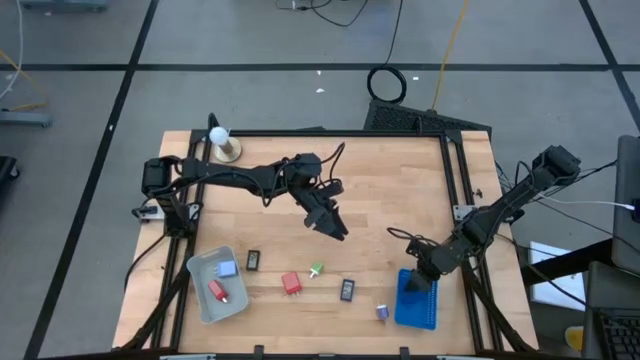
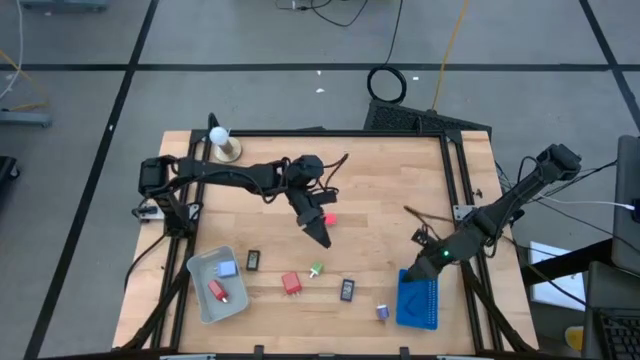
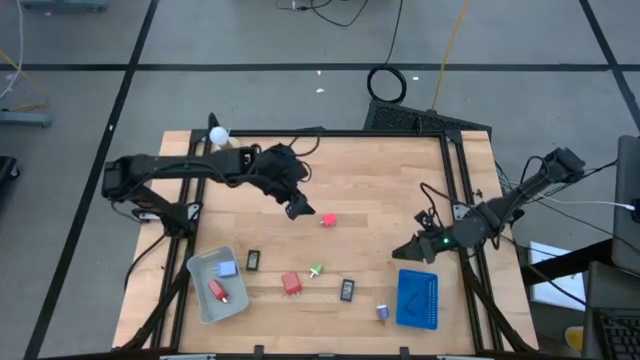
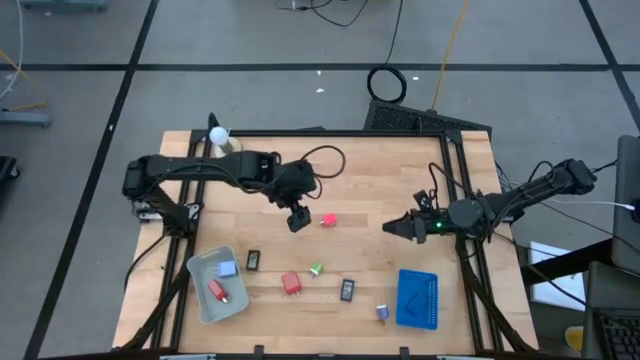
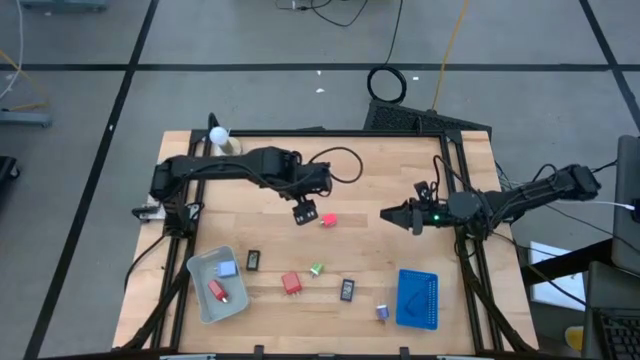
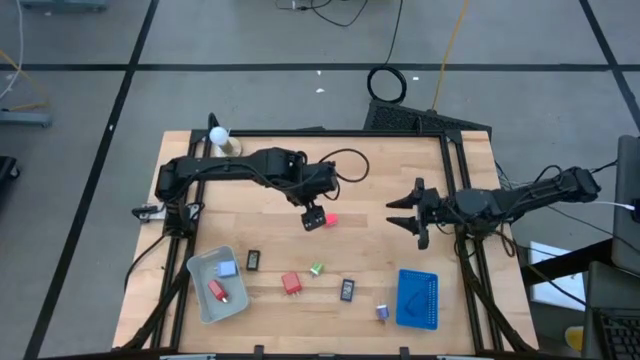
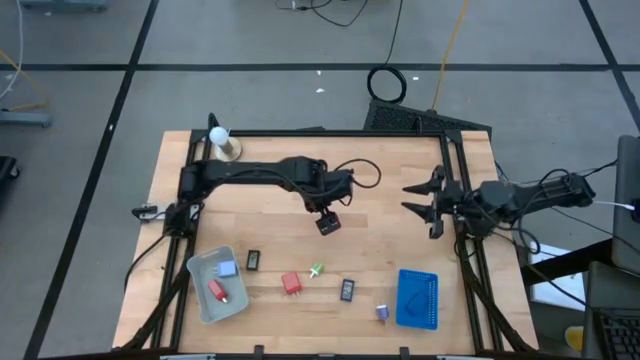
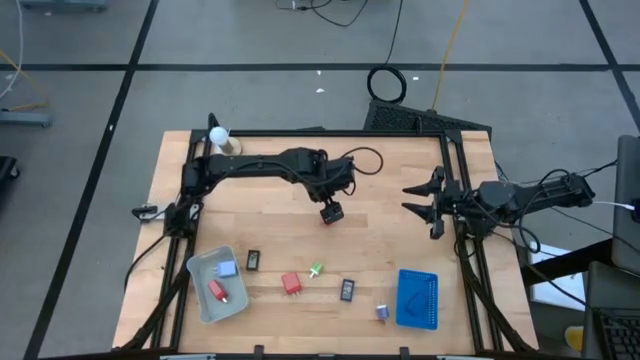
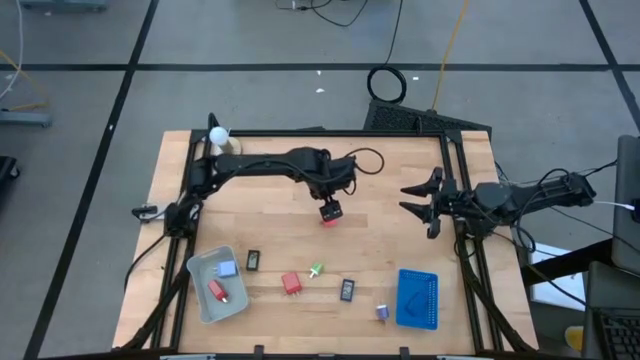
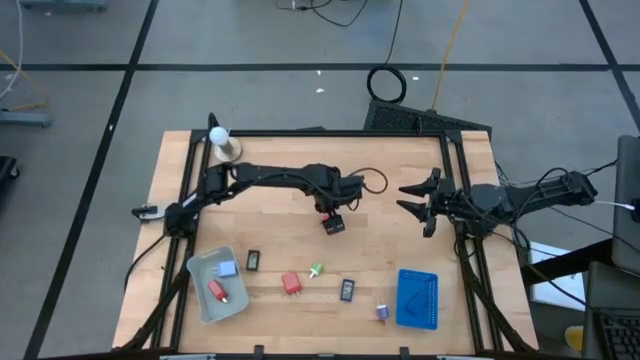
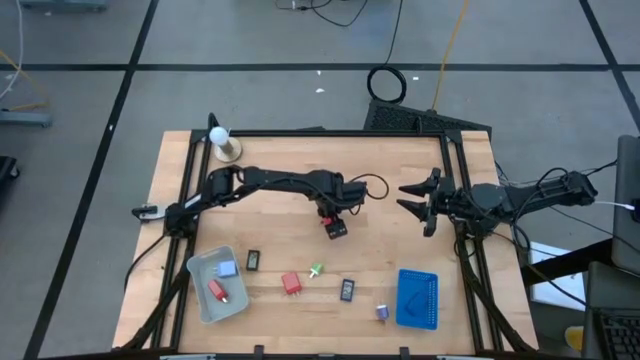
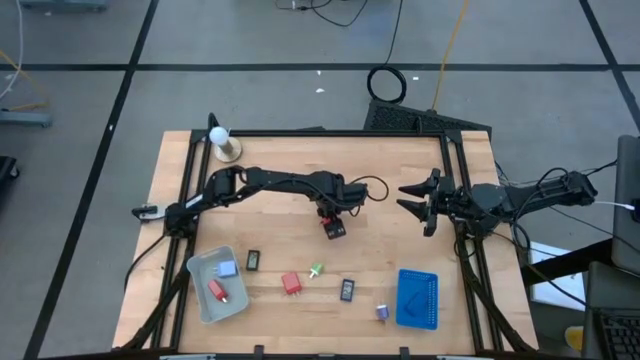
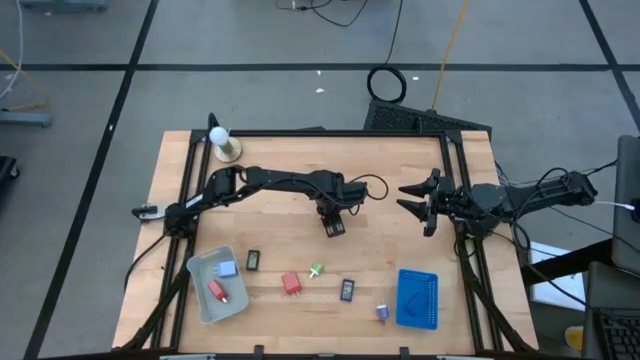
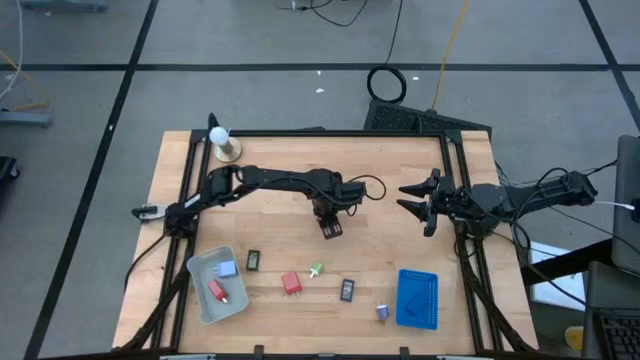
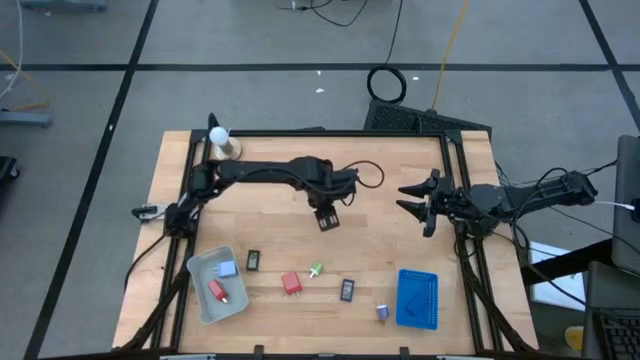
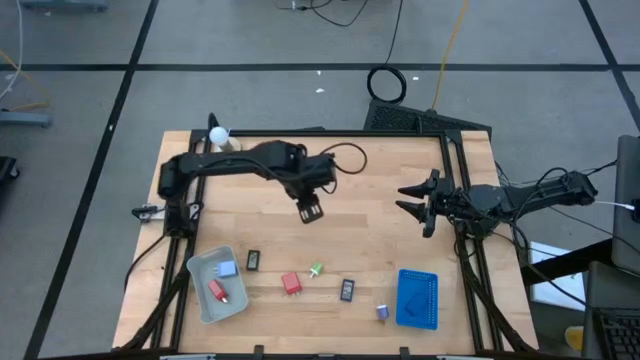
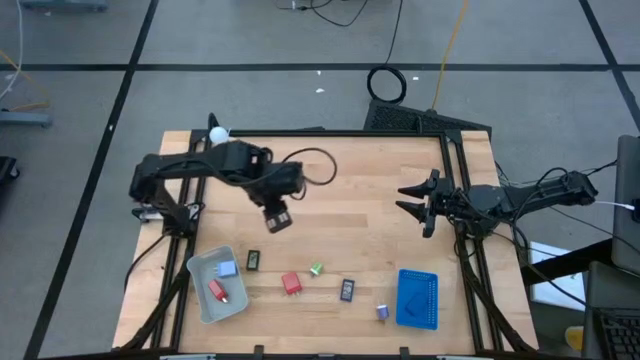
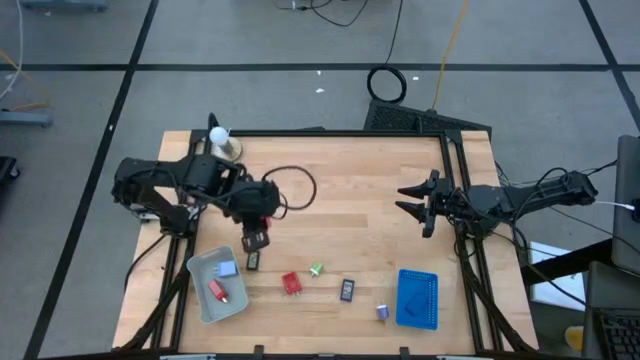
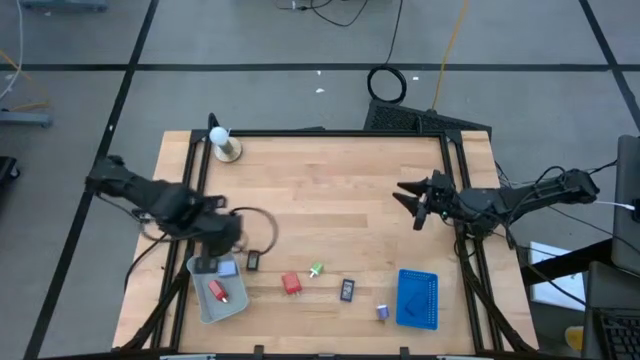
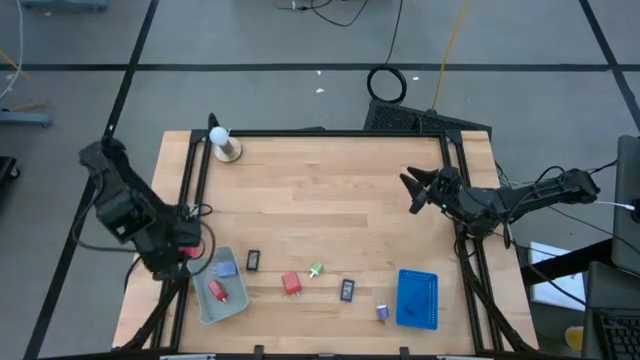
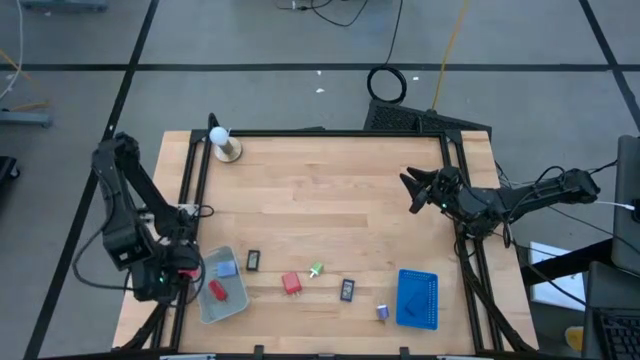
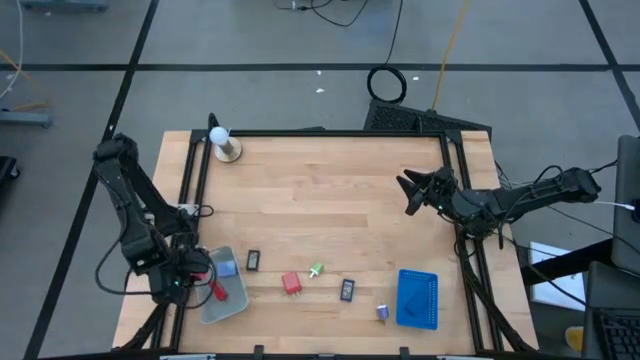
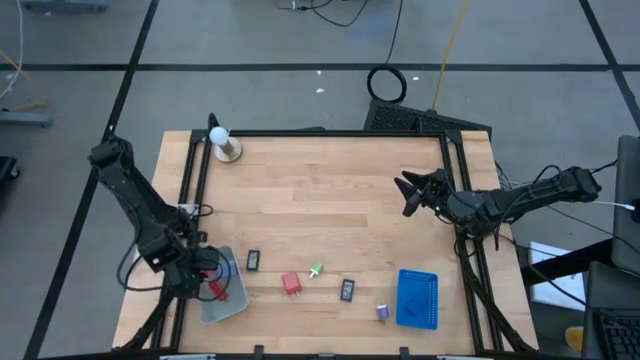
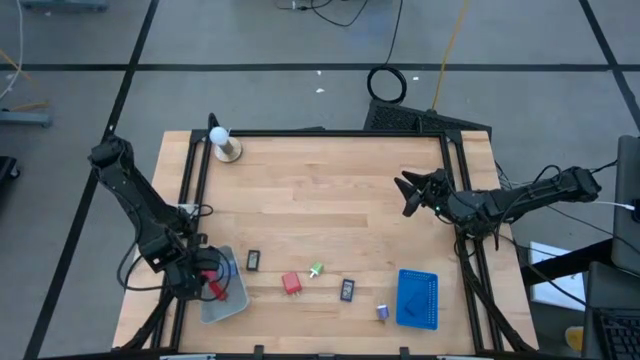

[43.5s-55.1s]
Task: Pick & Place Office items
Put the pink power adapter into the gray bin

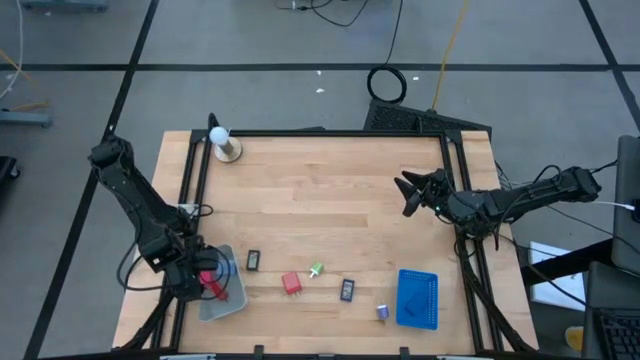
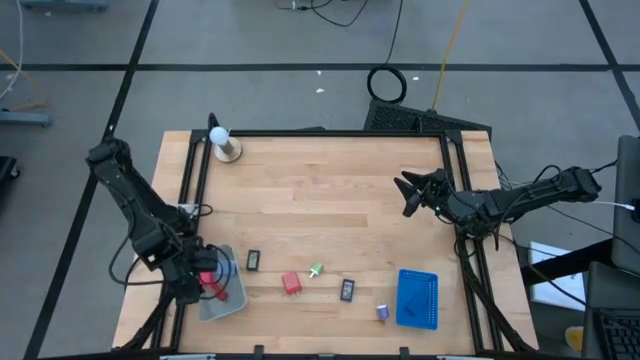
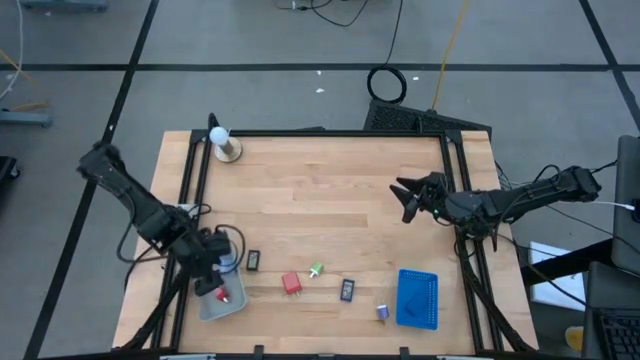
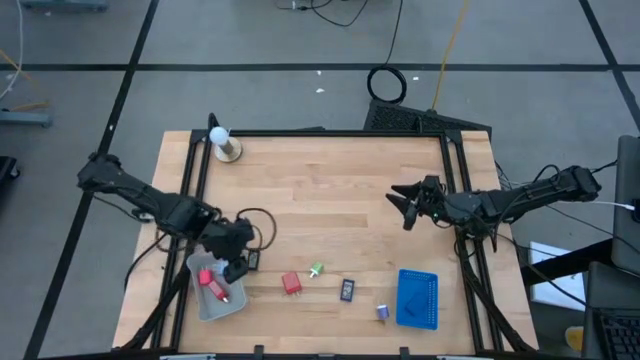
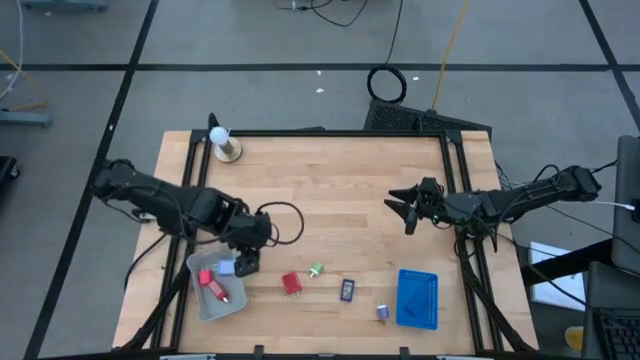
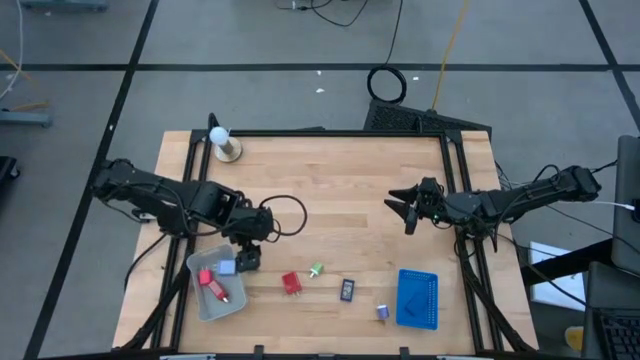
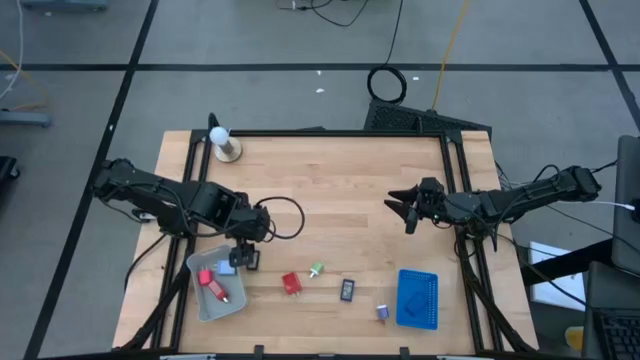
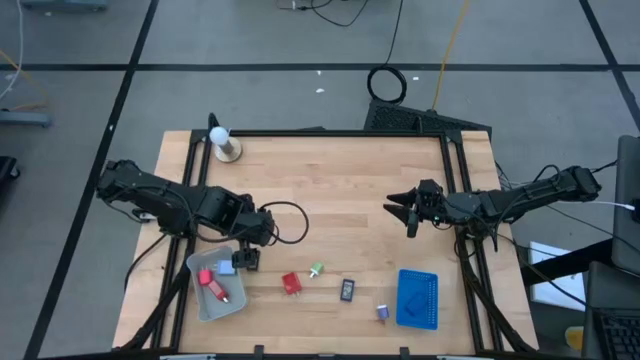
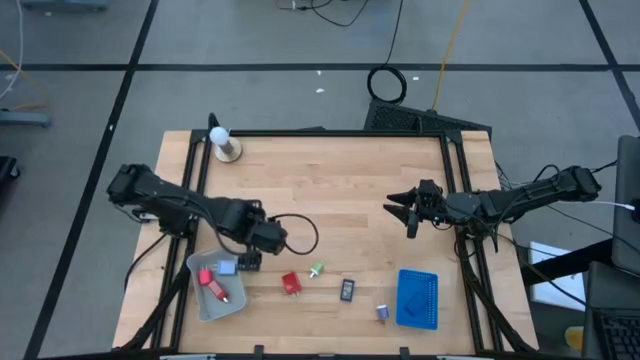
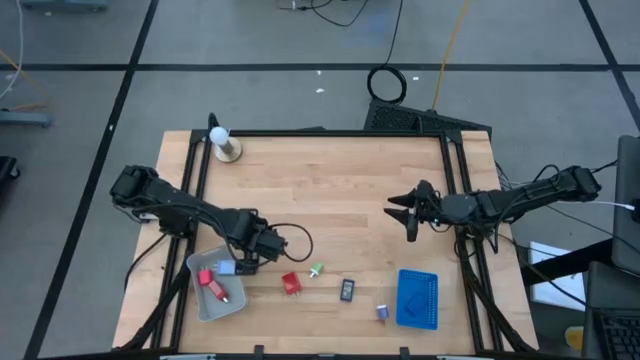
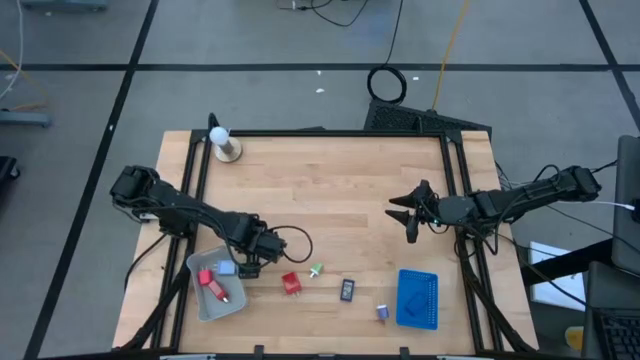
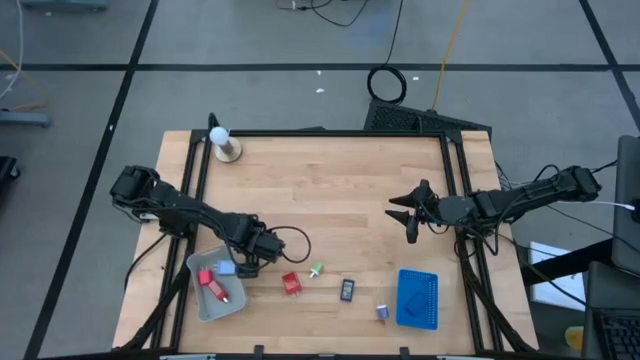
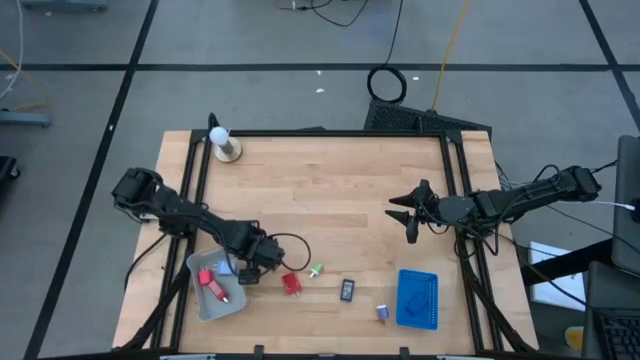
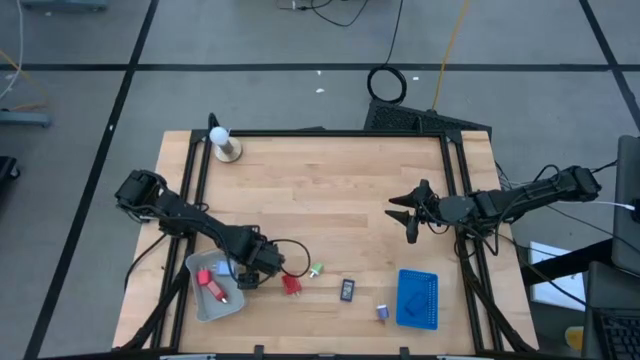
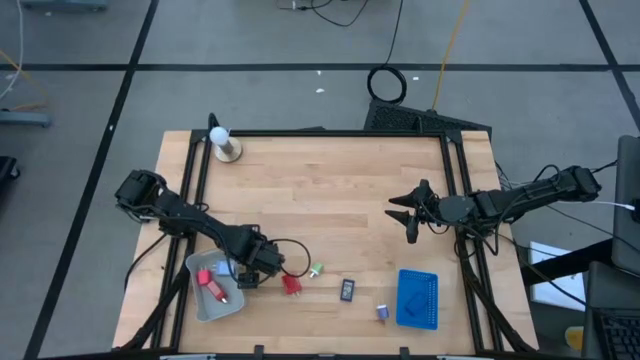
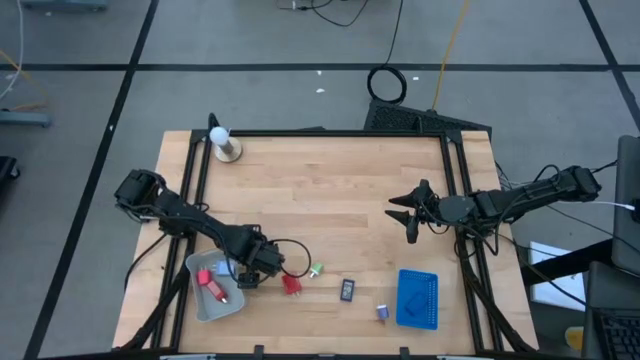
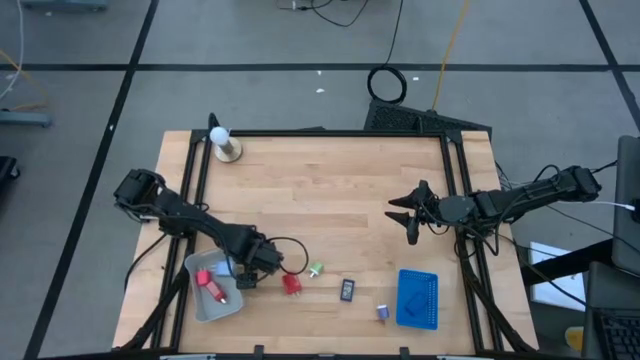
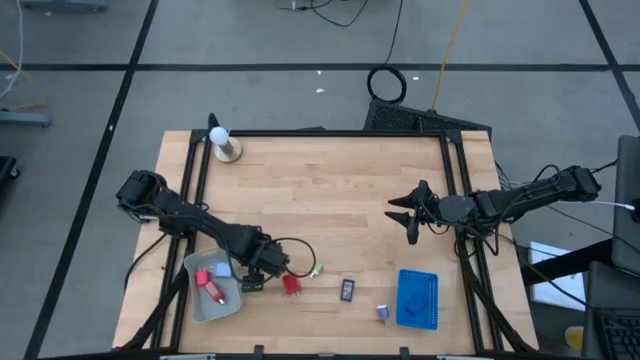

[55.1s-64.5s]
Put the black mini digital clock into the blue bin
